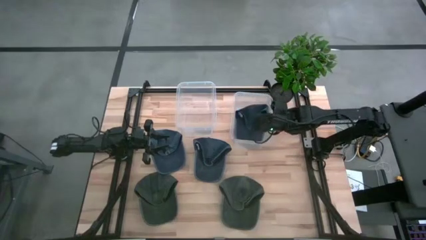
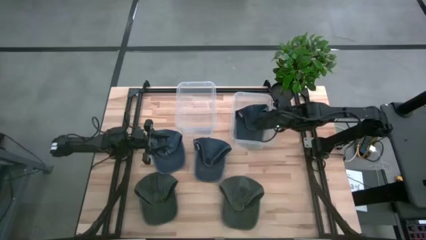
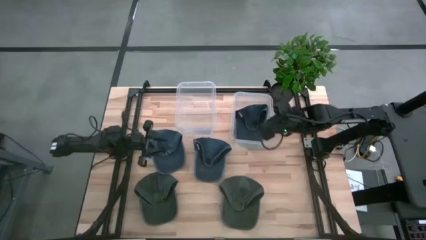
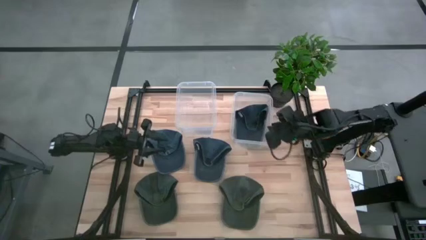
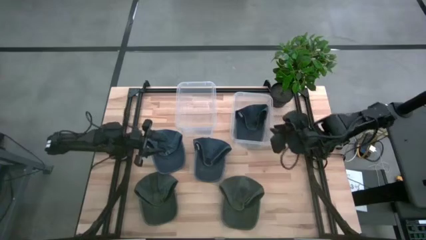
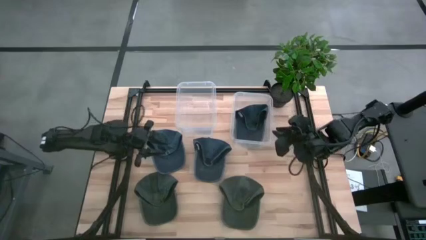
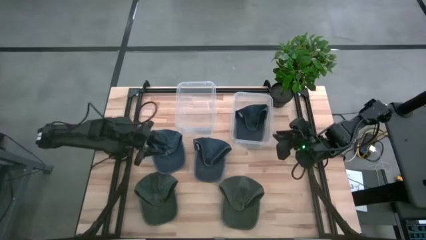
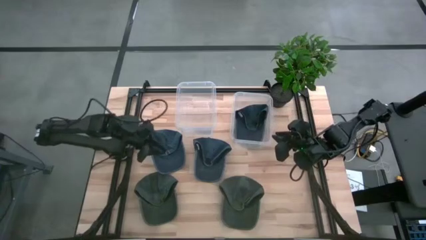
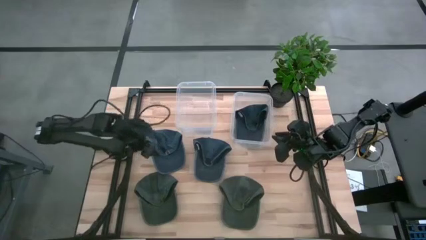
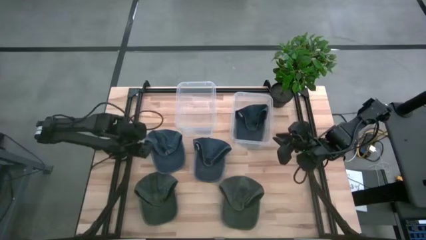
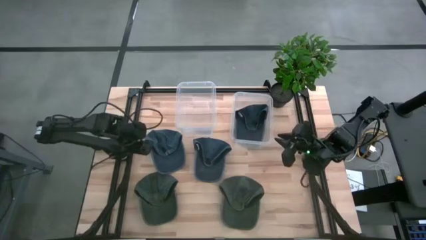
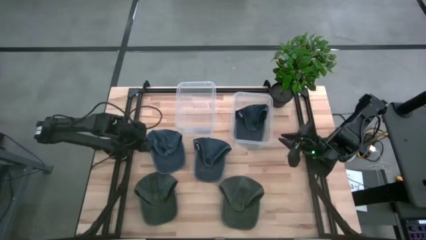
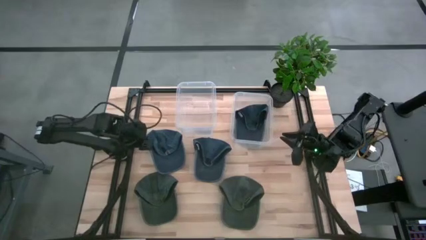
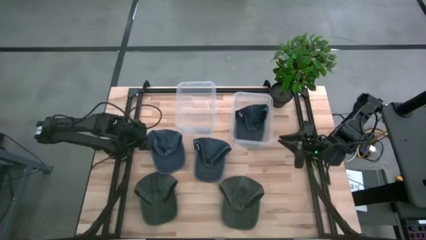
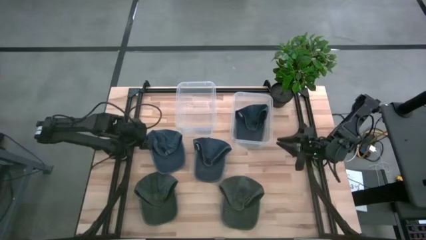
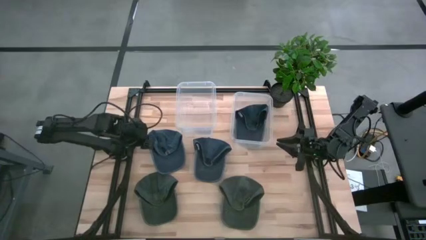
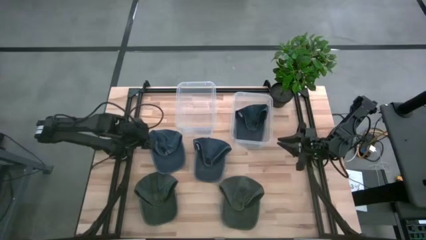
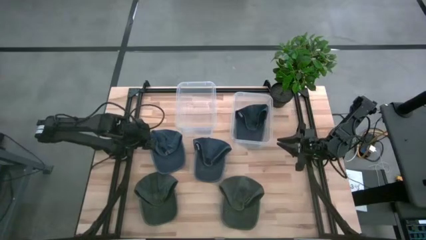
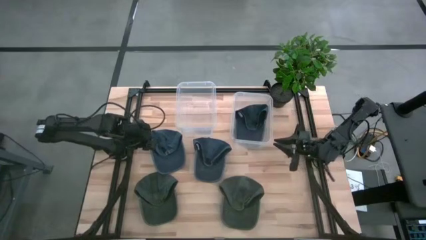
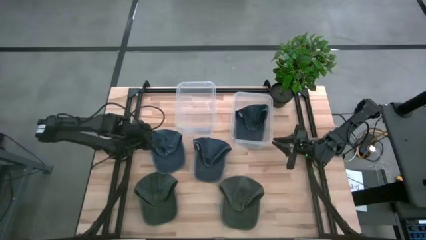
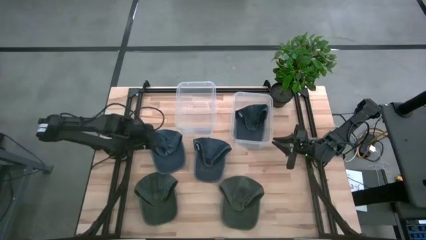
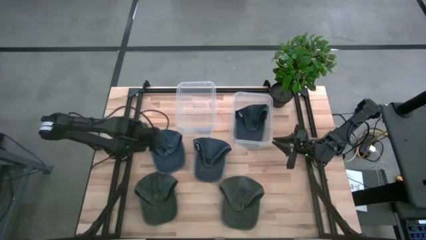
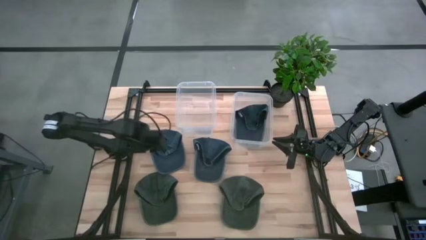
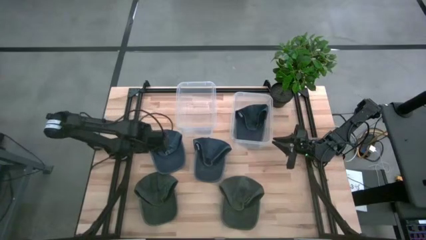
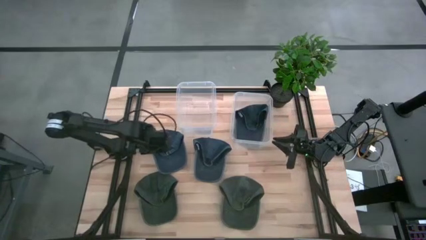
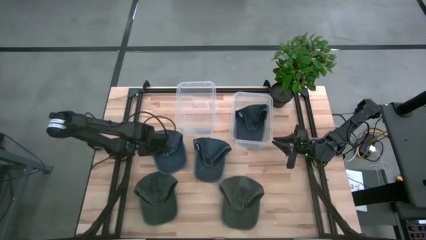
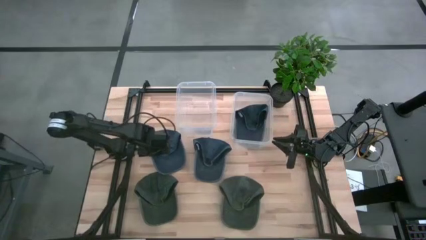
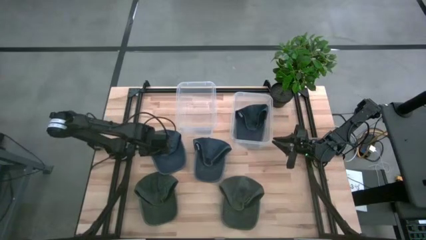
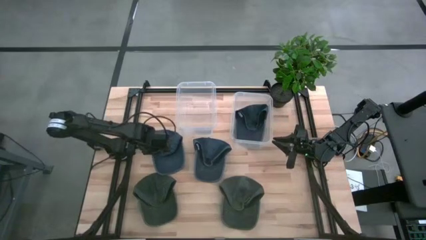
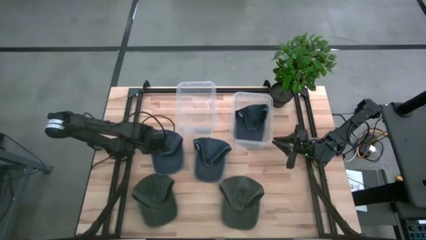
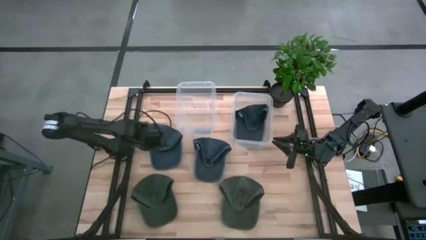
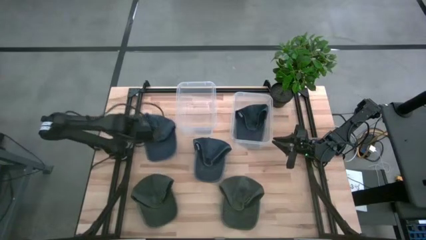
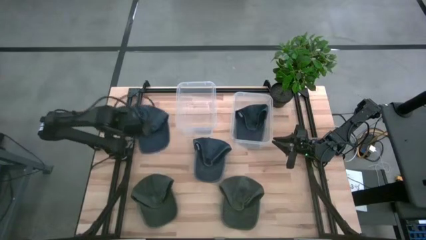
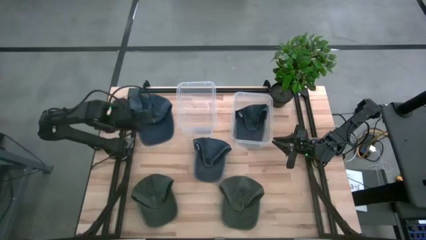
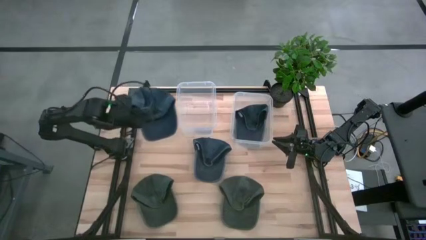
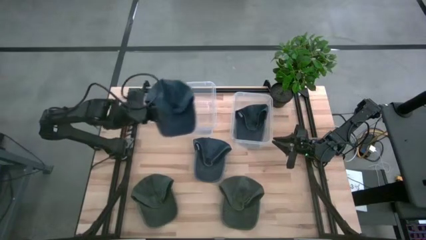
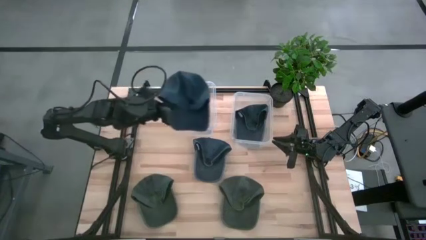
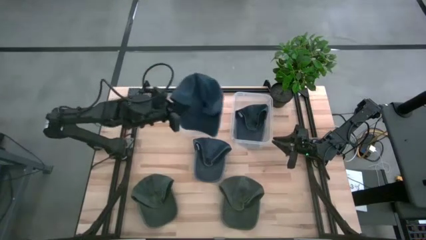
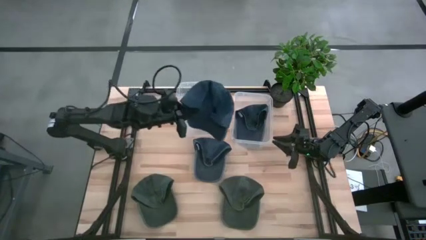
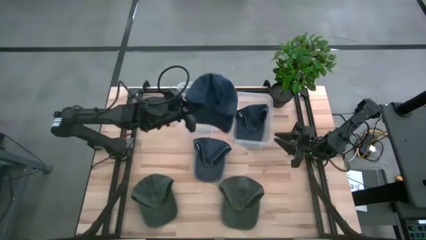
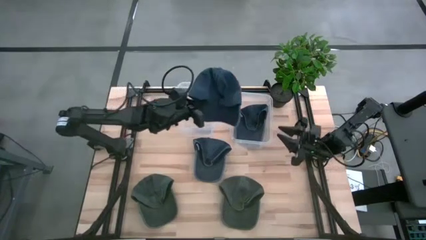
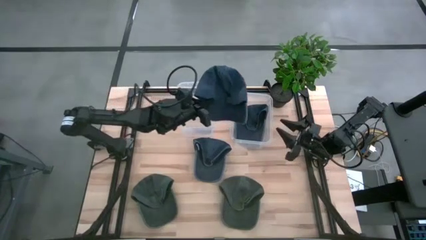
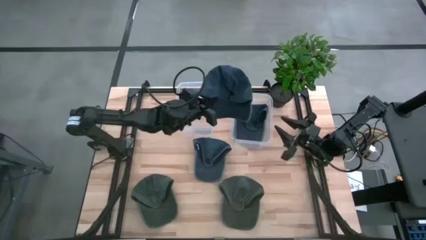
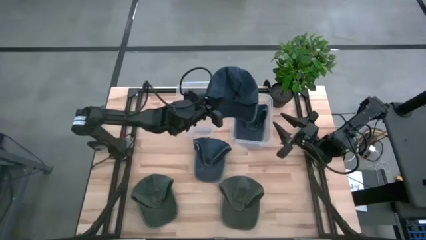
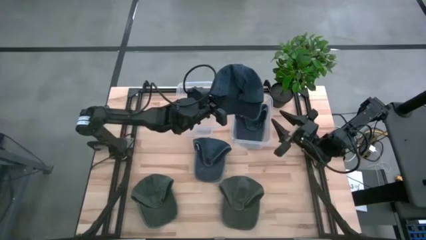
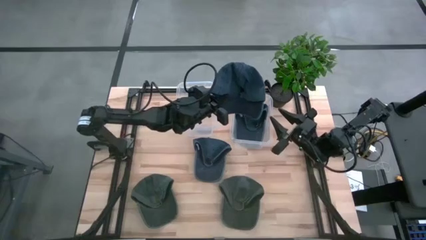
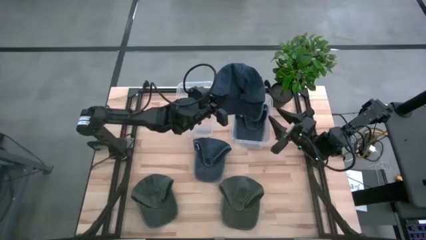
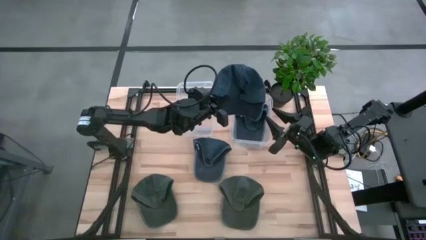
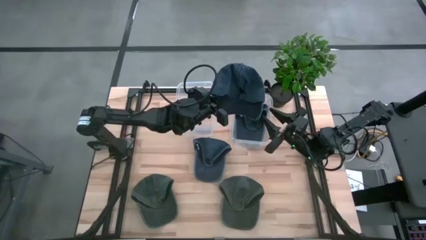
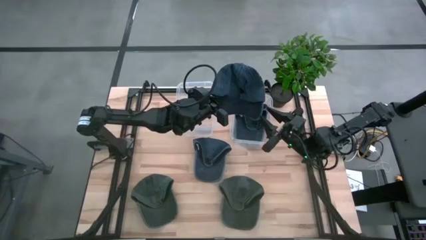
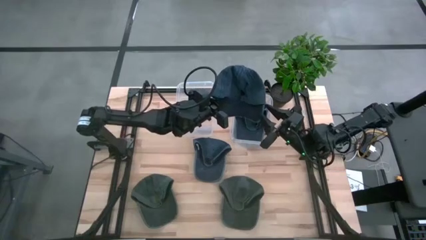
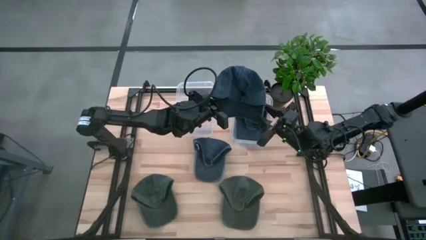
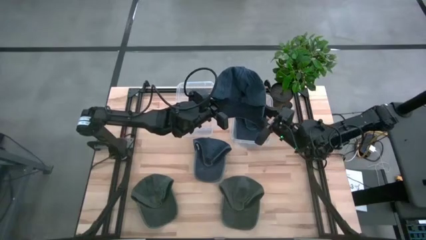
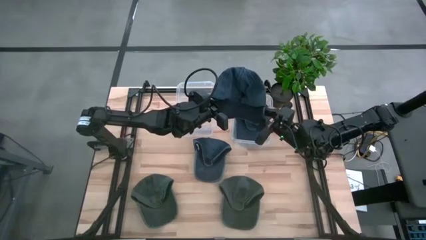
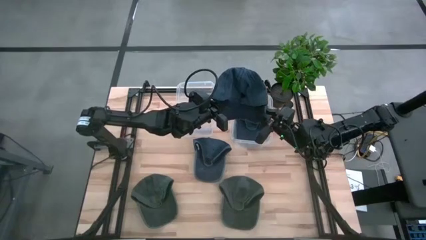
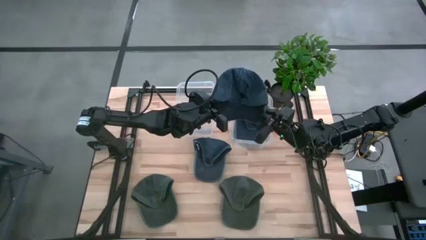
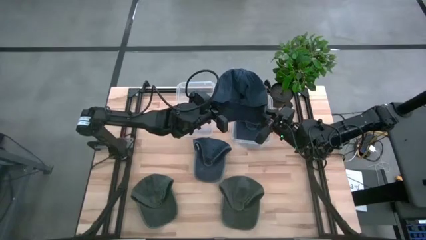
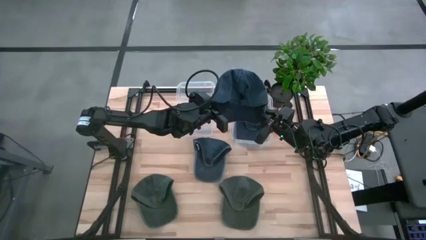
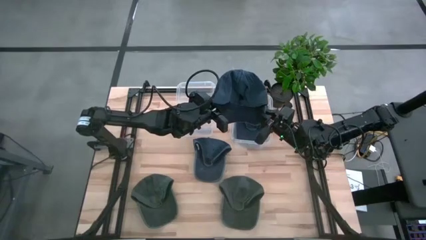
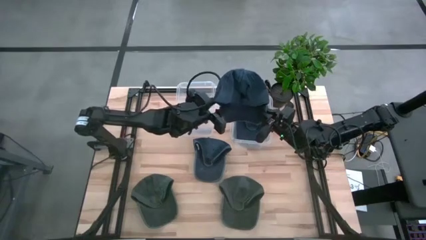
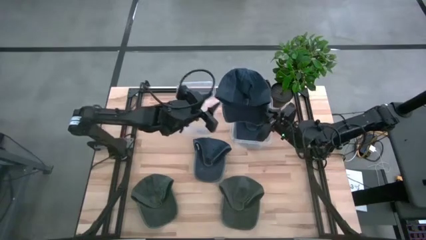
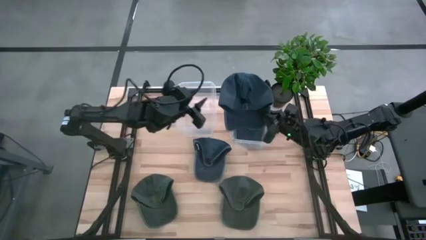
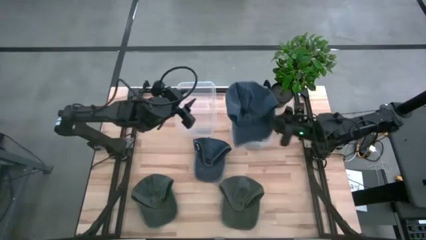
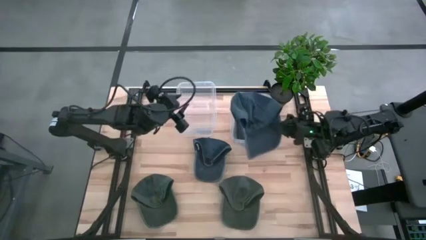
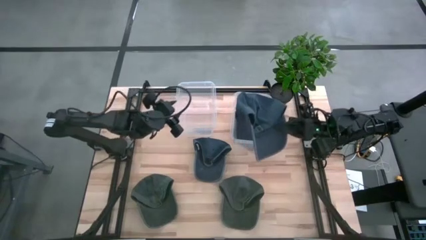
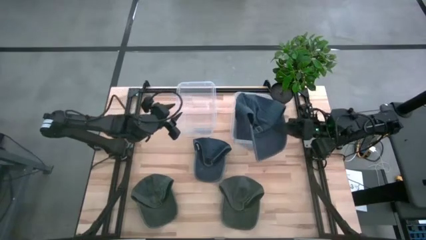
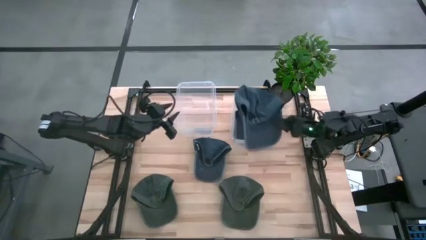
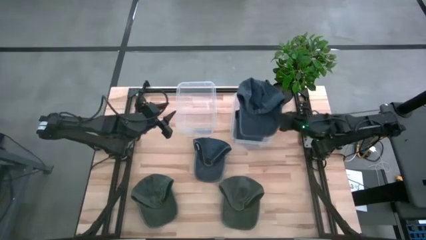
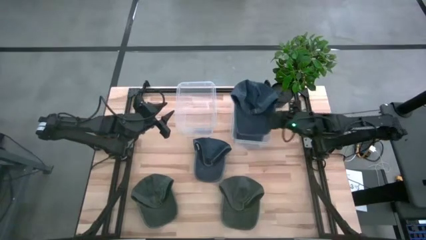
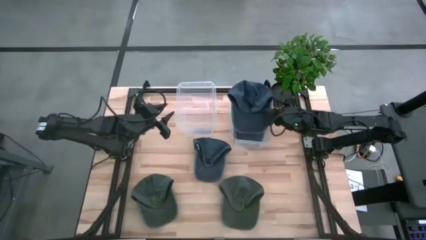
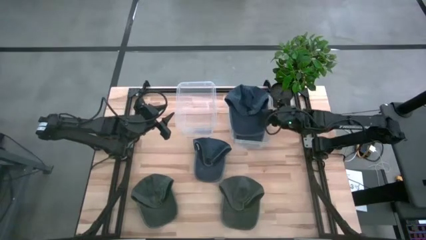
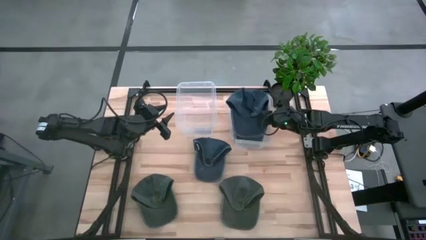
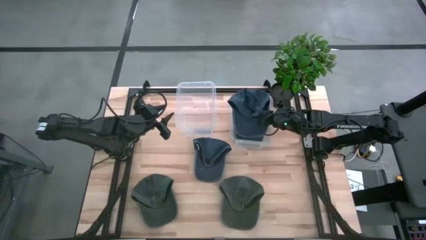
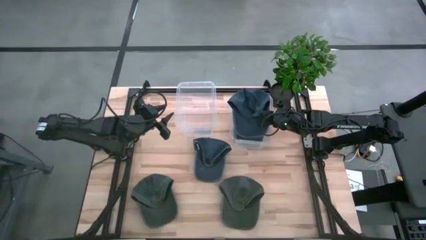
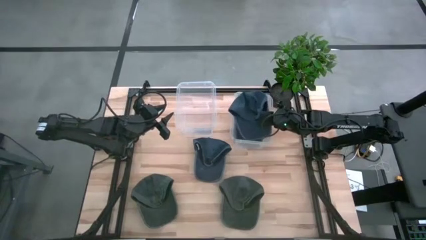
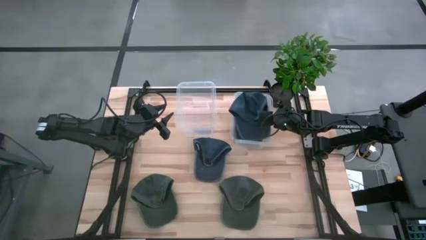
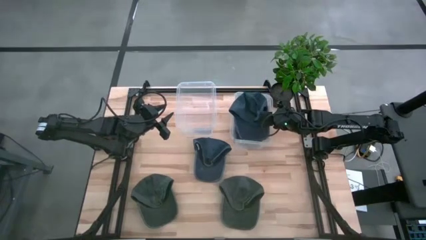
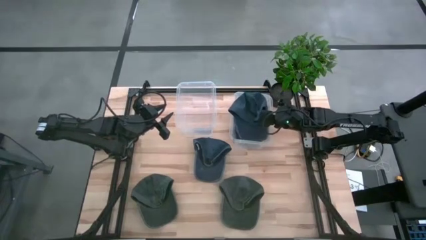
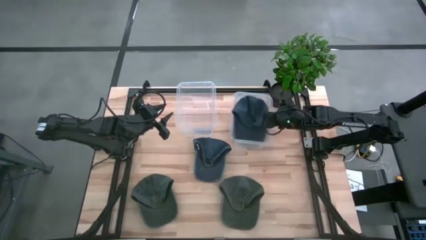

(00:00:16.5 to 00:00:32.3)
Task: Pick & Place hat
Put the left blue cap into the right transparent bin
